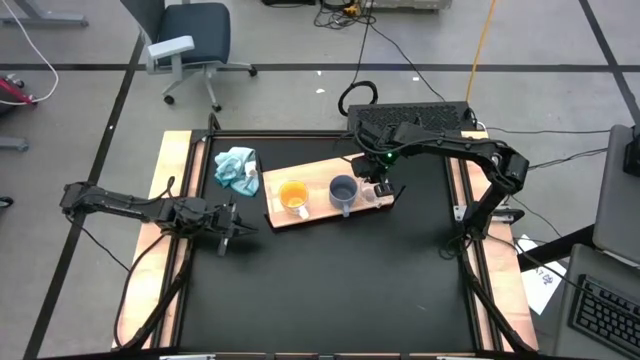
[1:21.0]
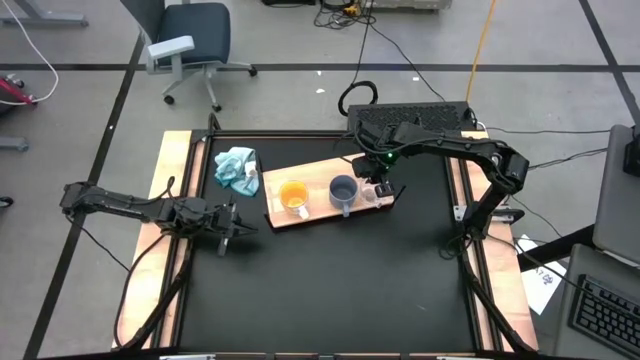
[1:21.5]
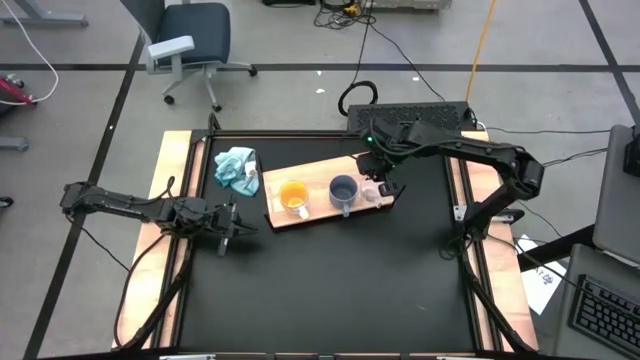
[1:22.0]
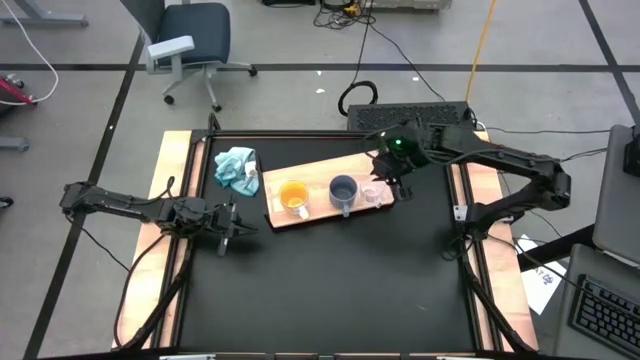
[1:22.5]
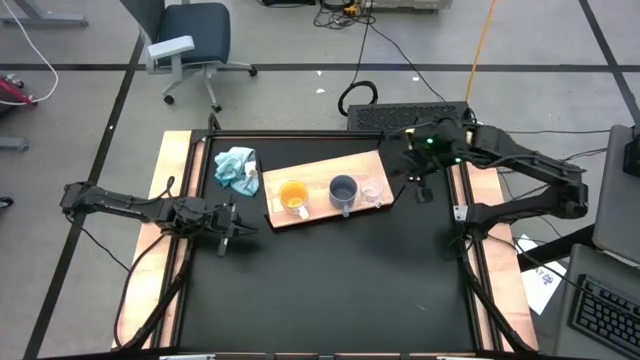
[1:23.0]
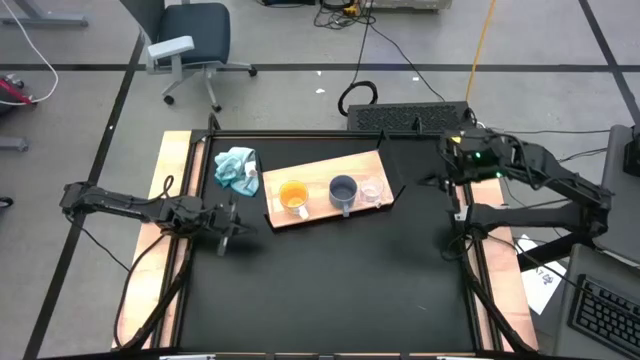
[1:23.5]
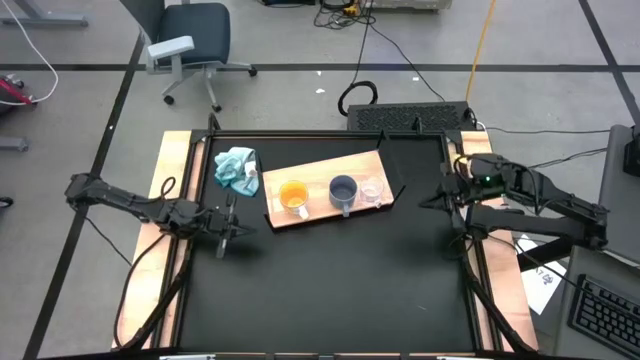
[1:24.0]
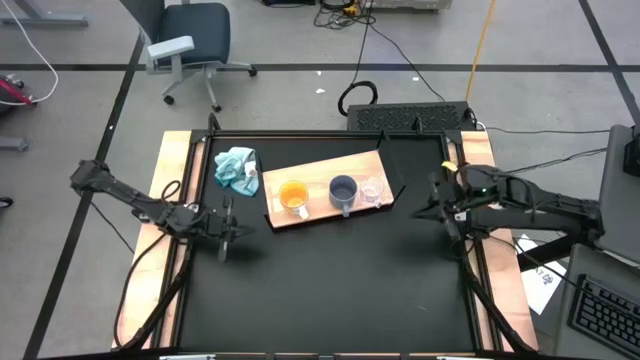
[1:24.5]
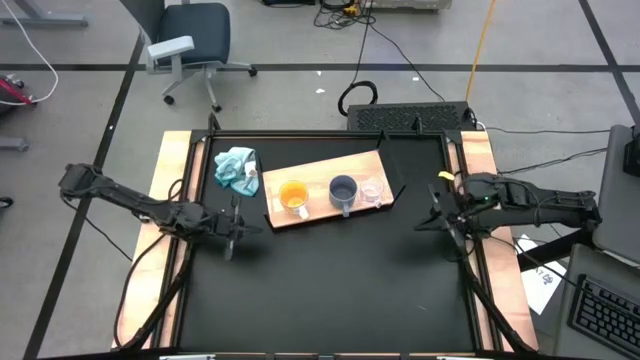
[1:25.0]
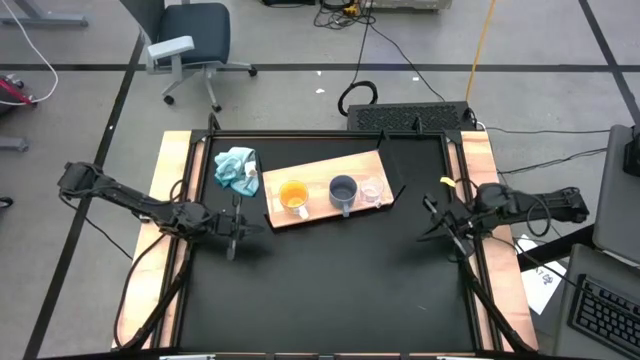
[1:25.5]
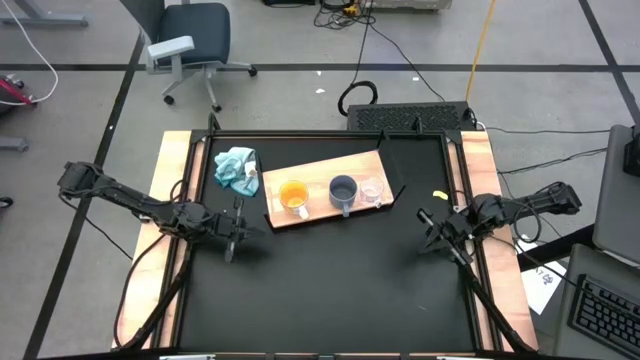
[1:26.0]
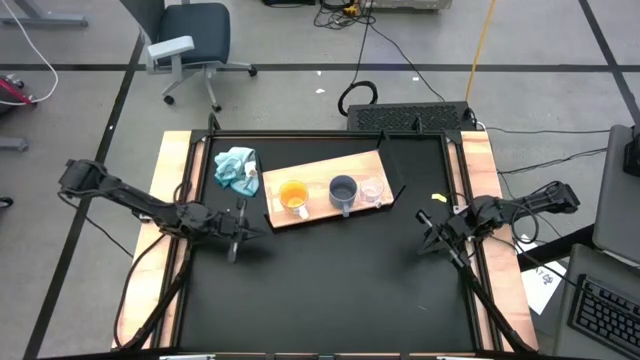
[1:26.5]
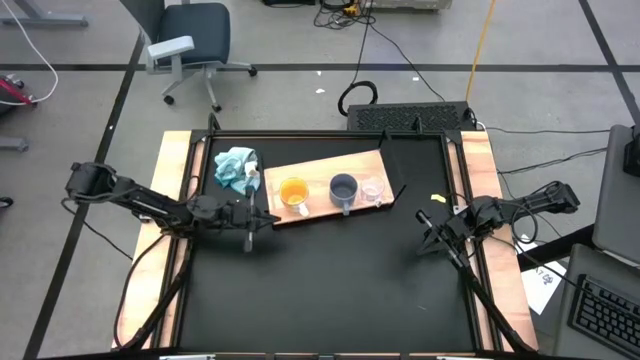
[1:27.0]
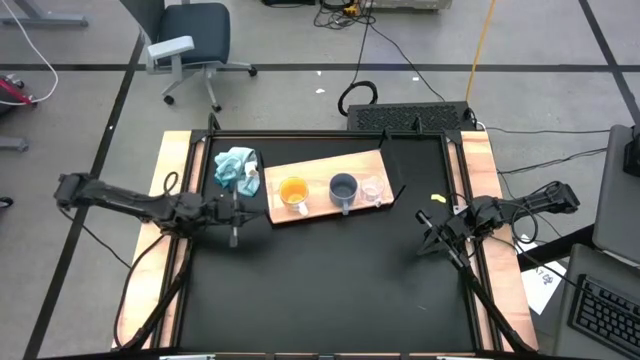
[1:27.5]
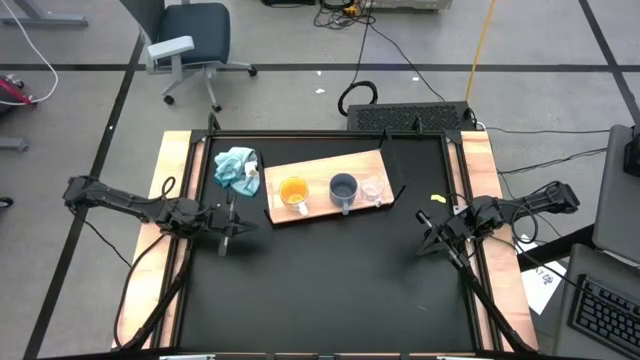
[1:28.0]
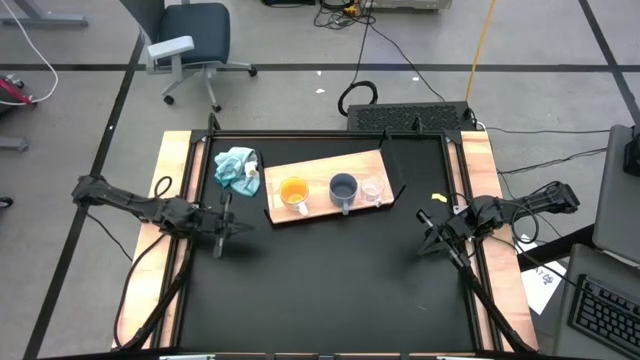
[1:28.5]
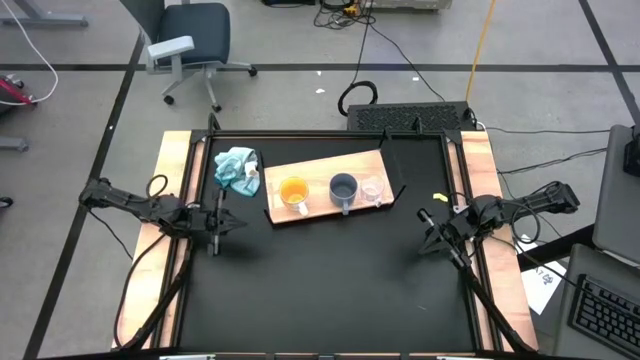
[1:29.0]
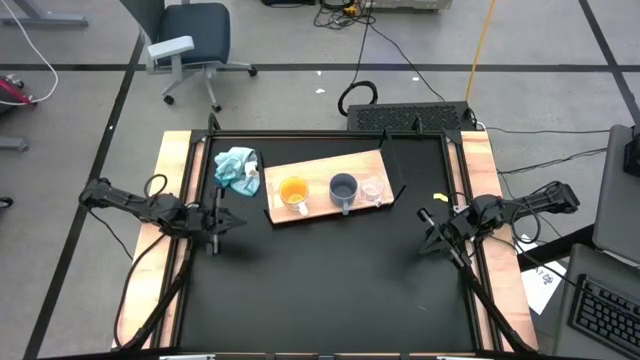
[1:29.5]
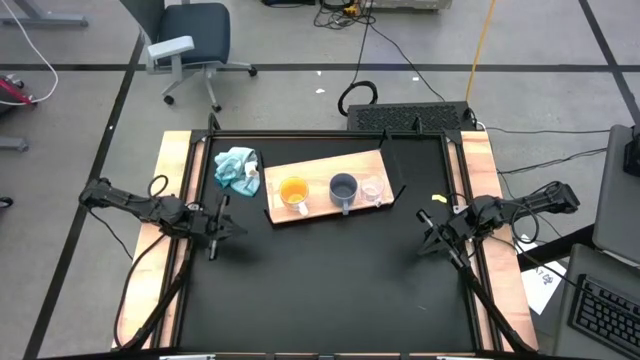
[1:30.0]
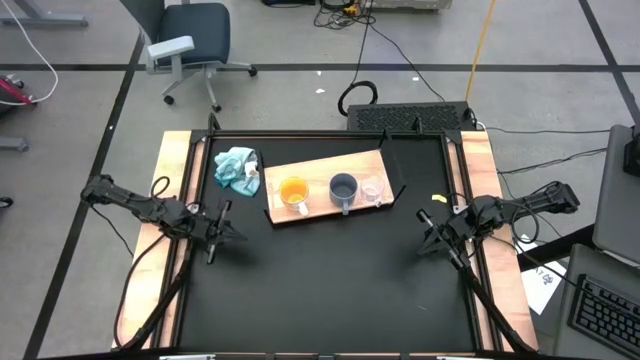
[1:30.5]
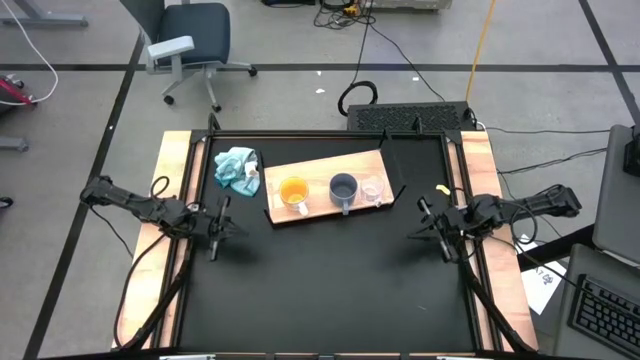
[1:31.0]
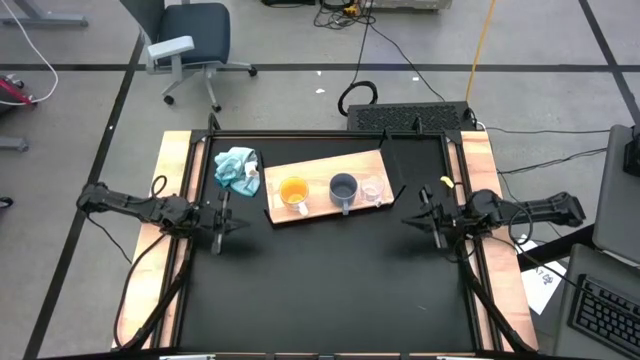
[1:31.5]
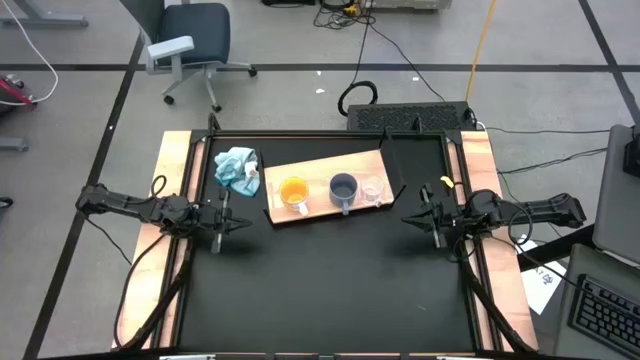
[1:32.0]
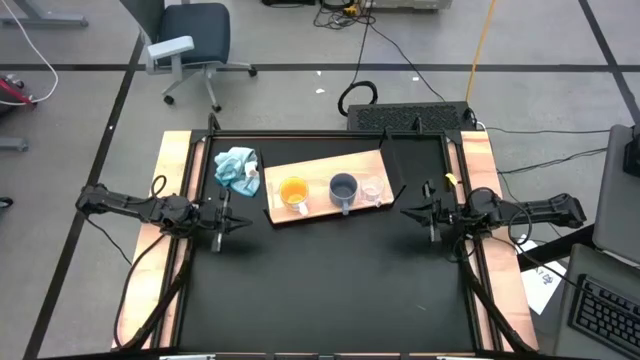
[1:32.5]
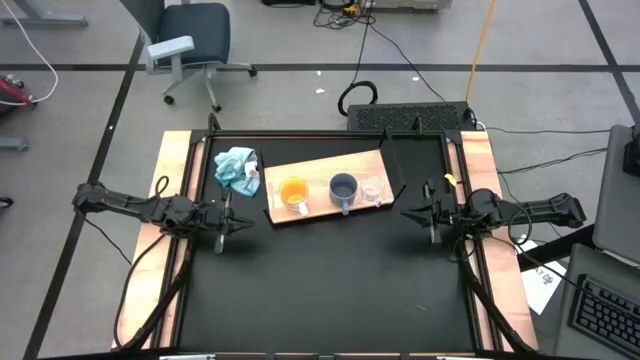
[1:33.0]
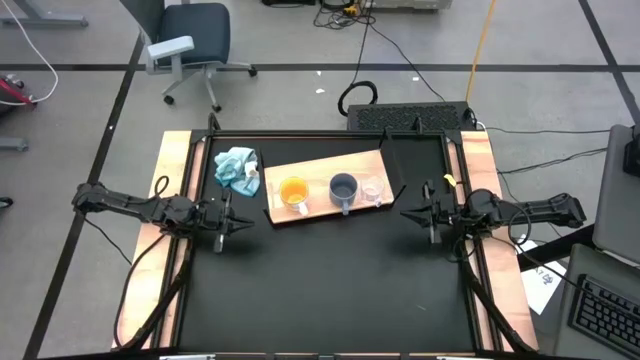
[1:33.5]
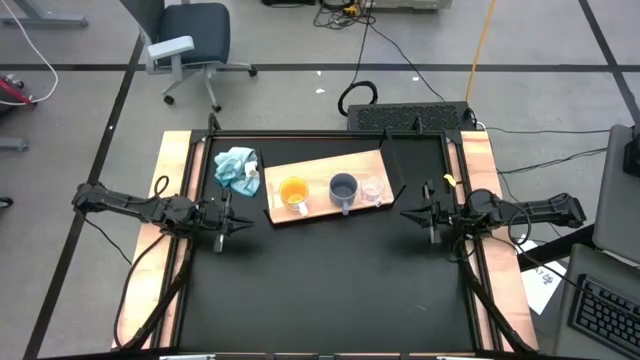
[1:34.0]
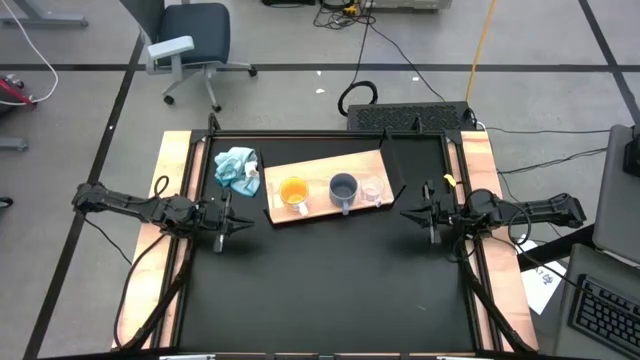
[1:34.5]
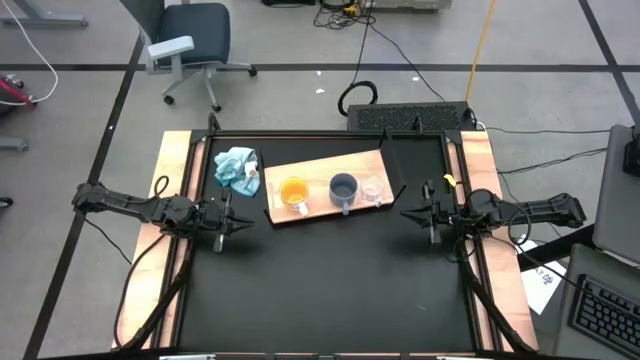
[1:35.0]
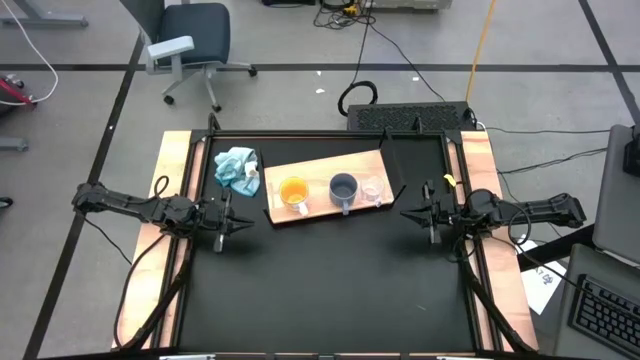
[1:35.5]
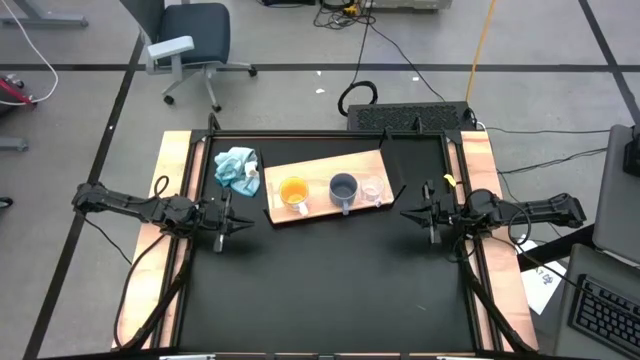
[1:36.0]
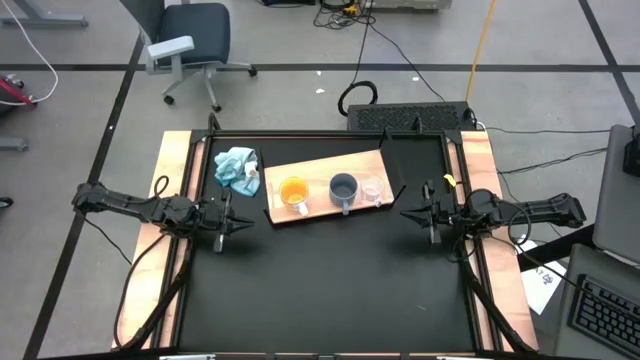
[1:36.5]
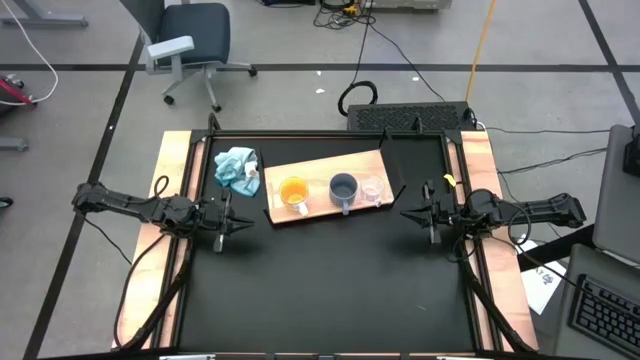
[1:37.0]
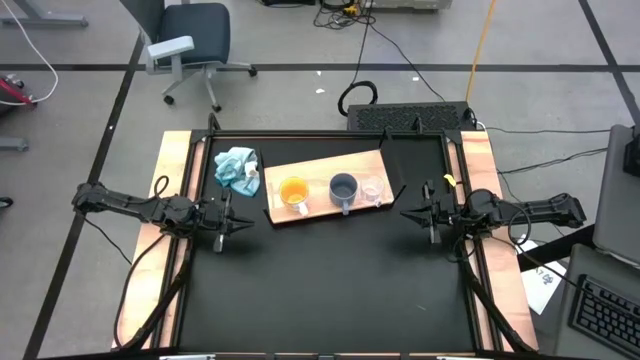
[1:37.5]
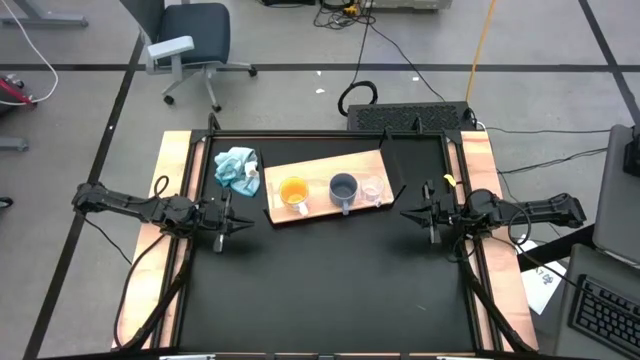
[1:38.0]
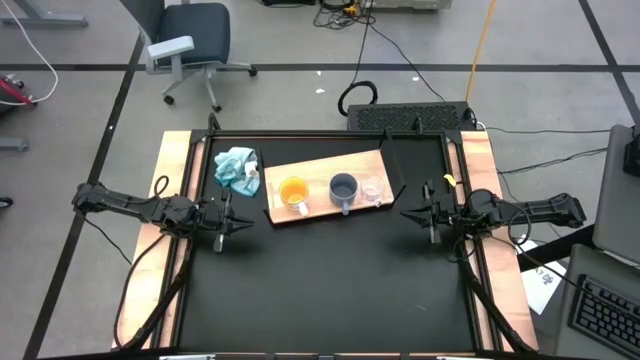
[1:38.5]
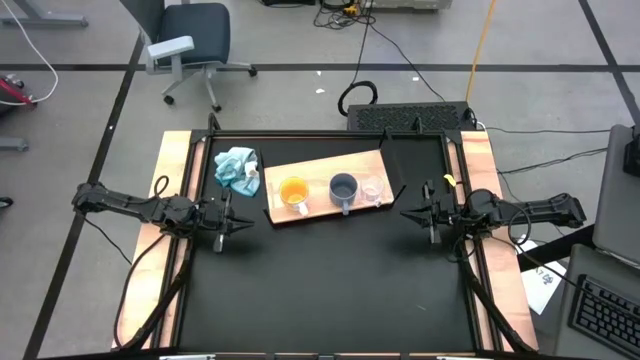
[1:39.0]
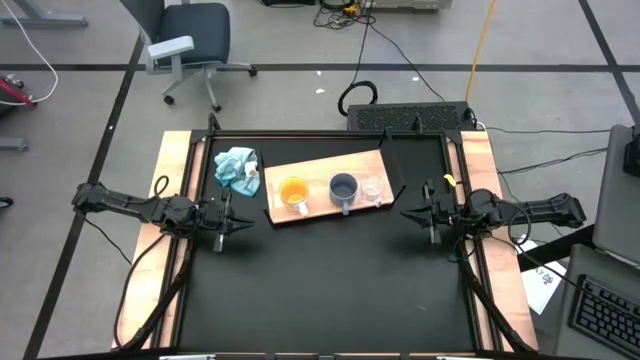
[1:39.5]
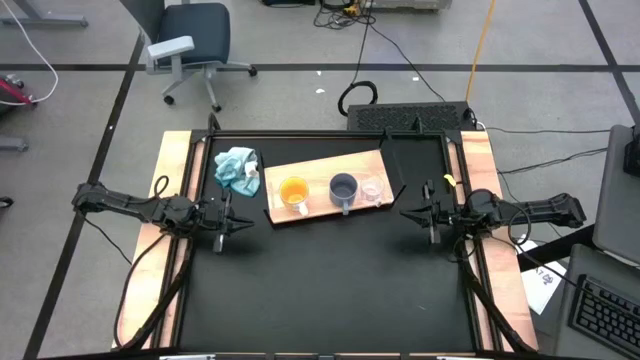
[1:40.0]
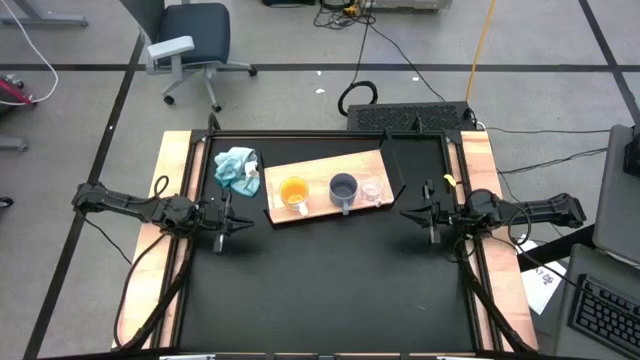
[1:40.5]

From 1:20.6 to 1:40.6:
Task: Stack small to large cups/mugs on shelf
Return to Home Position

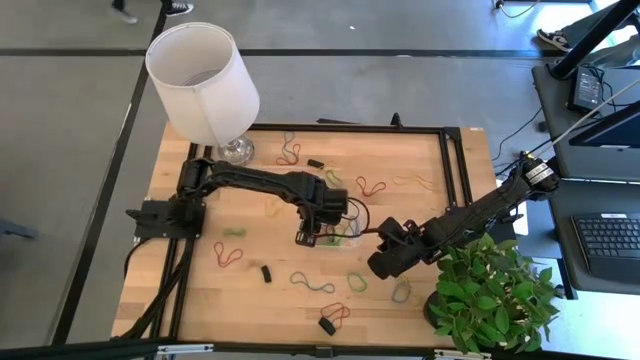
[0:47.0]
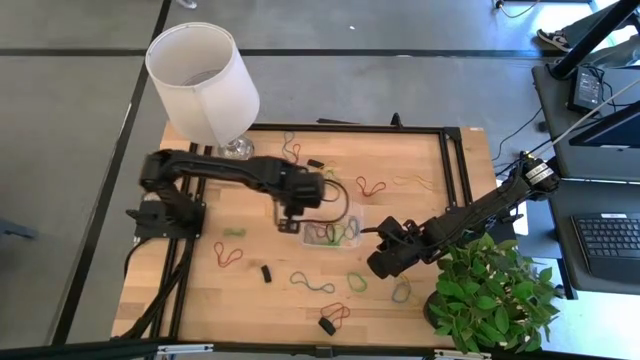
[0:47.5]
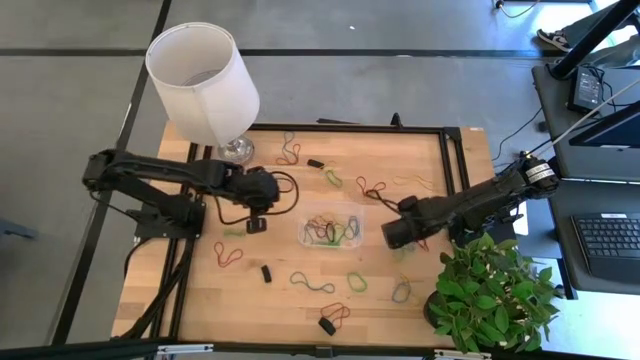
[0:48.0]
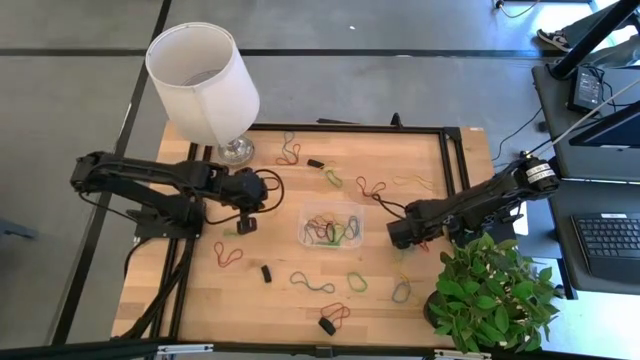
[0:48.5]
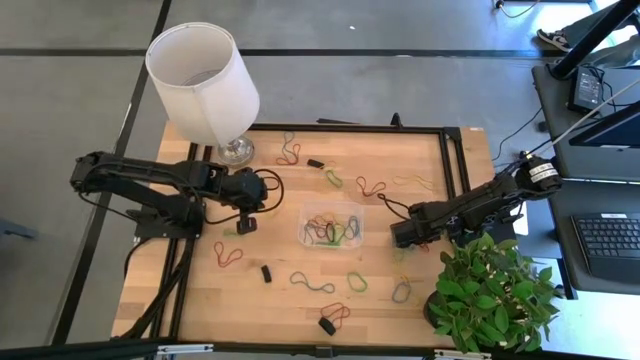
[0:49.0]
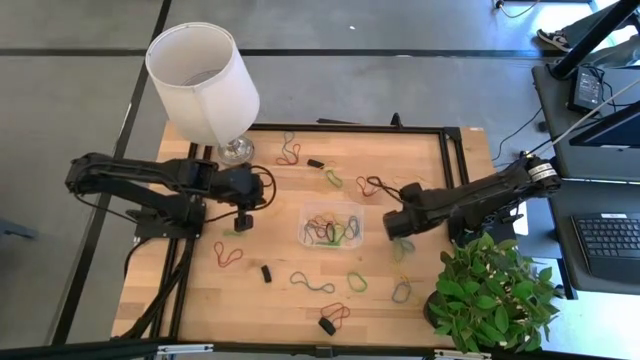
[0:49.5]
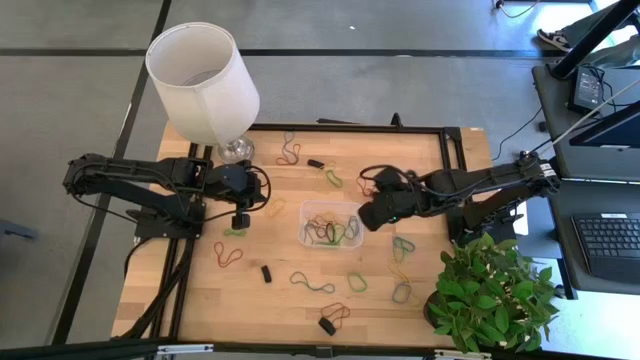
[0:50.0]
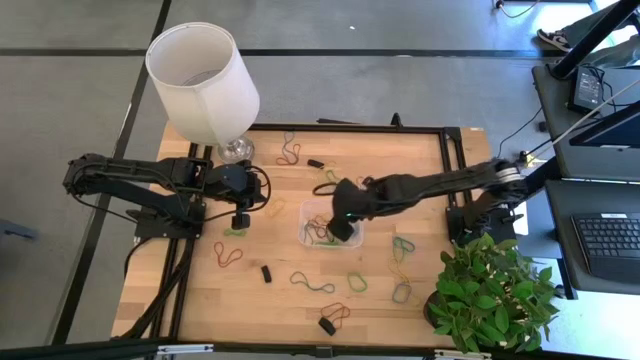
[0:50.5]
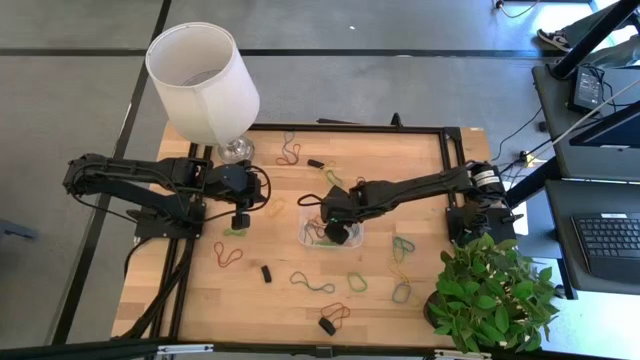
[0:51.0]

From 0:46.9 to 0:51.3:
Task: Pick and place rubber bands into bin
Put the red rubber band into the transparent bin
